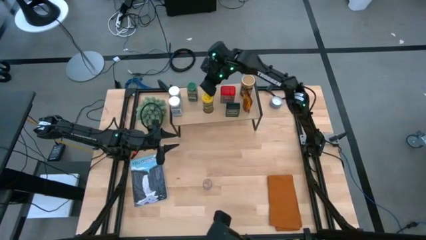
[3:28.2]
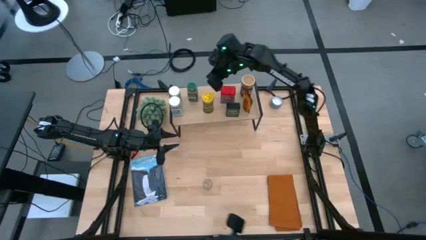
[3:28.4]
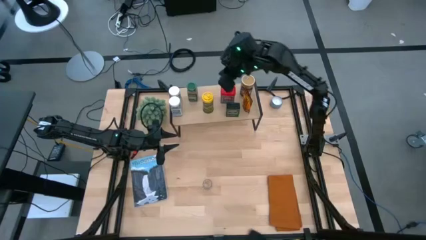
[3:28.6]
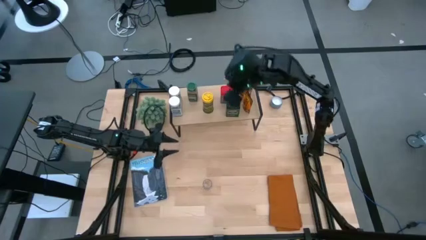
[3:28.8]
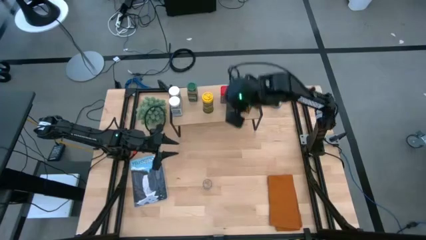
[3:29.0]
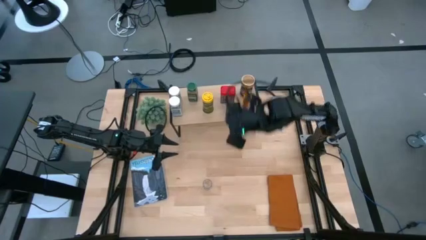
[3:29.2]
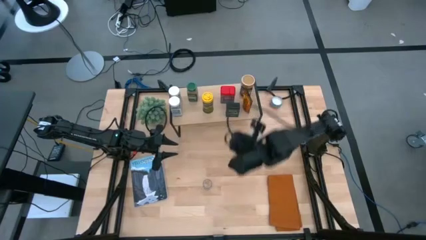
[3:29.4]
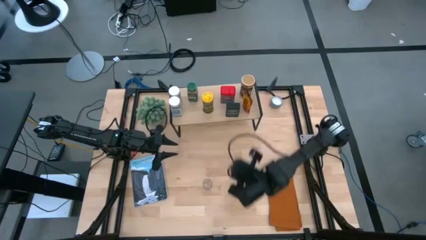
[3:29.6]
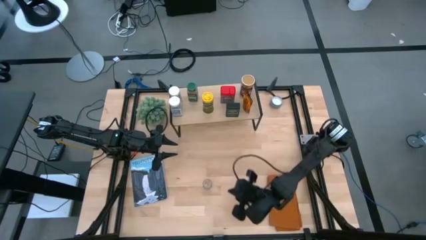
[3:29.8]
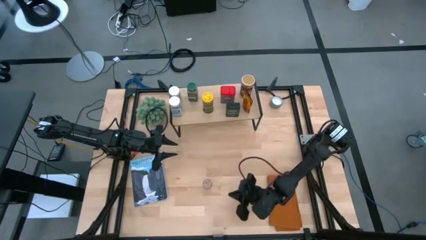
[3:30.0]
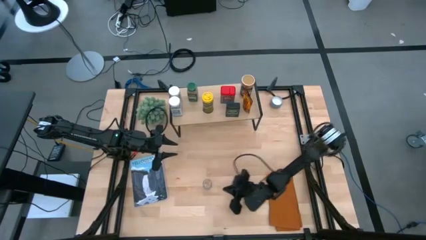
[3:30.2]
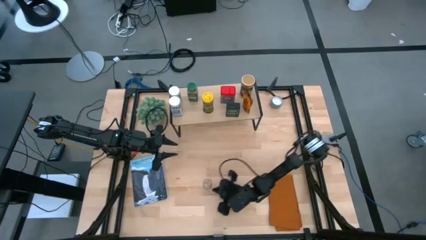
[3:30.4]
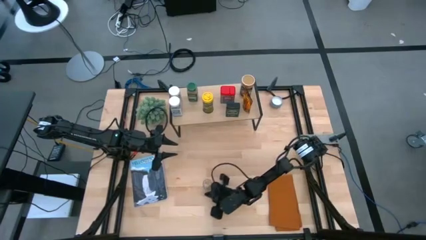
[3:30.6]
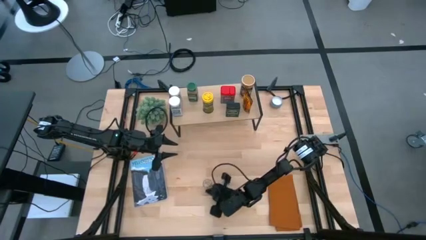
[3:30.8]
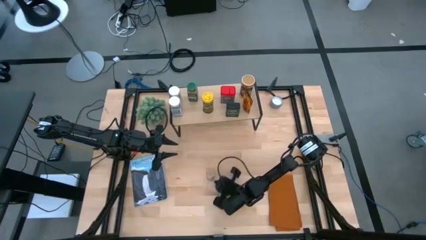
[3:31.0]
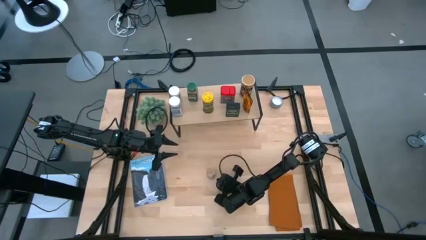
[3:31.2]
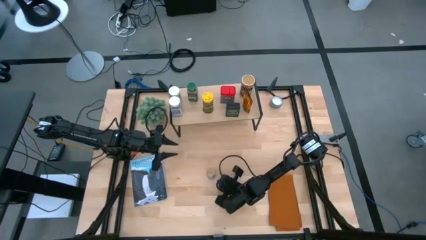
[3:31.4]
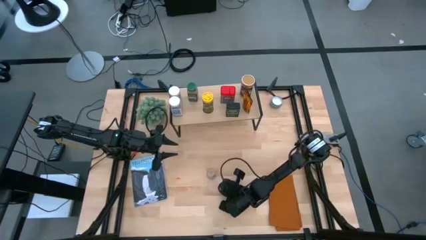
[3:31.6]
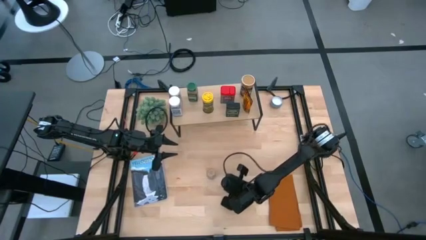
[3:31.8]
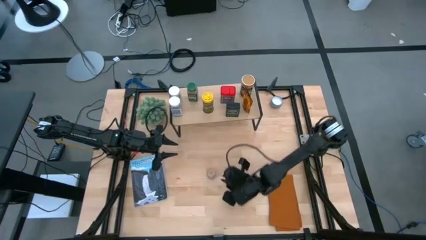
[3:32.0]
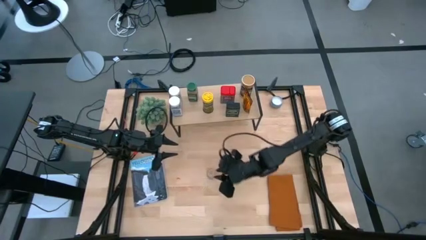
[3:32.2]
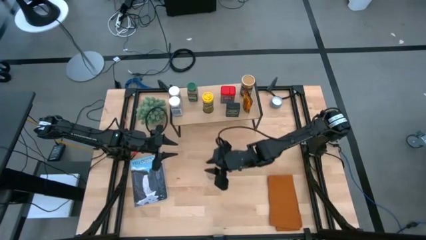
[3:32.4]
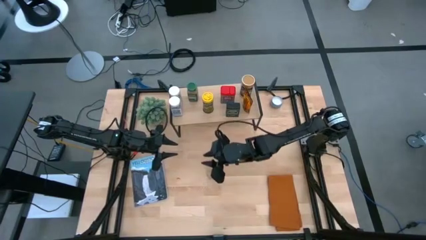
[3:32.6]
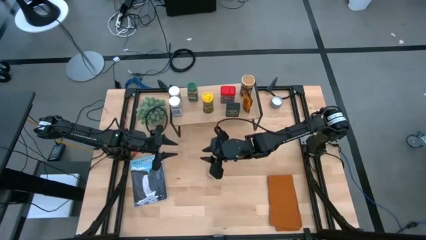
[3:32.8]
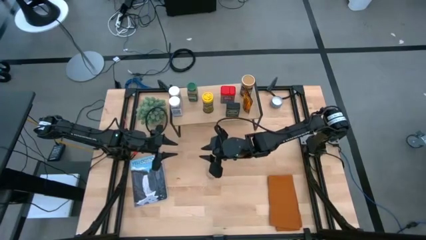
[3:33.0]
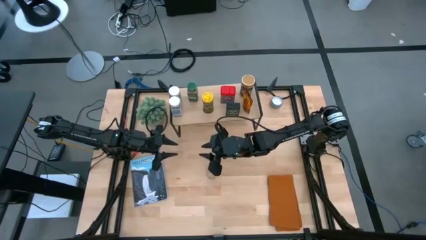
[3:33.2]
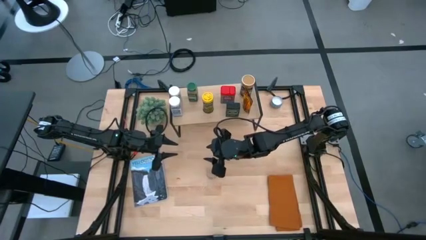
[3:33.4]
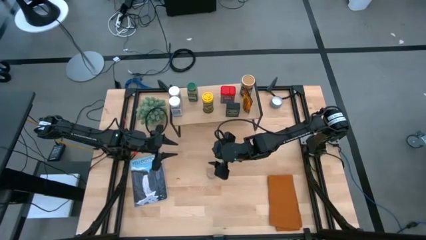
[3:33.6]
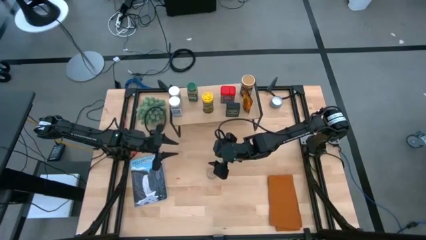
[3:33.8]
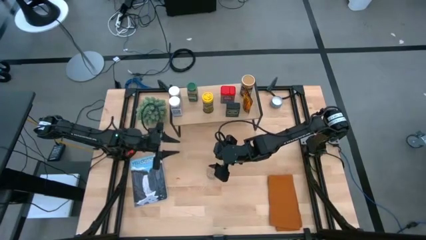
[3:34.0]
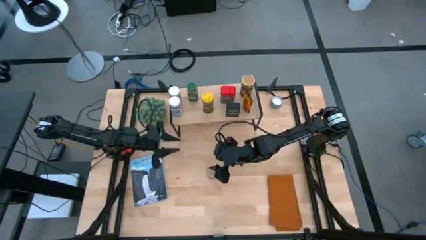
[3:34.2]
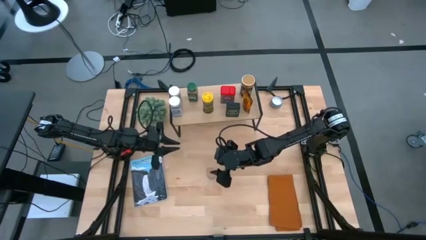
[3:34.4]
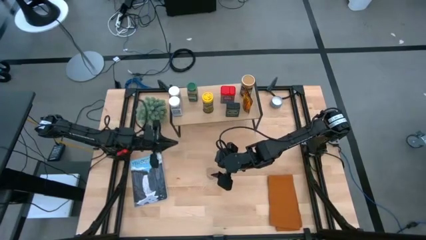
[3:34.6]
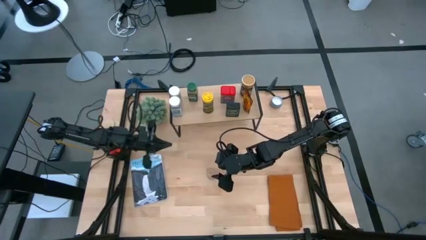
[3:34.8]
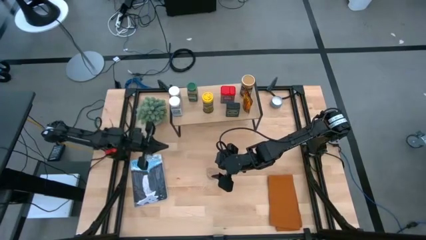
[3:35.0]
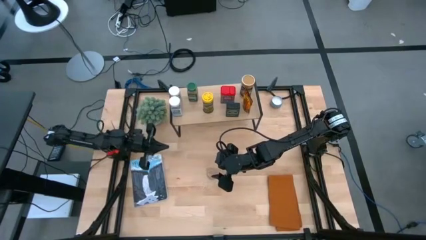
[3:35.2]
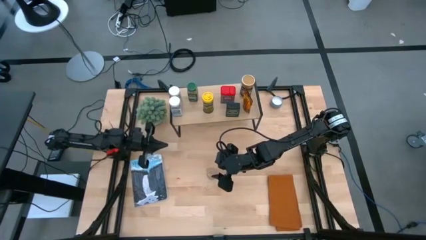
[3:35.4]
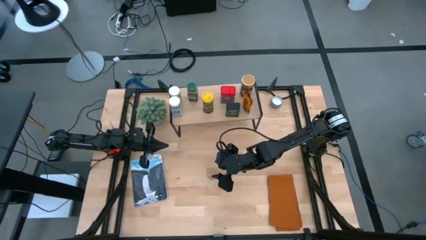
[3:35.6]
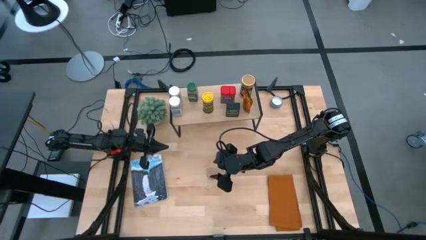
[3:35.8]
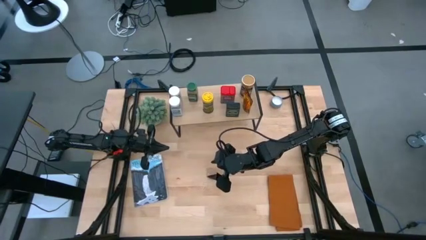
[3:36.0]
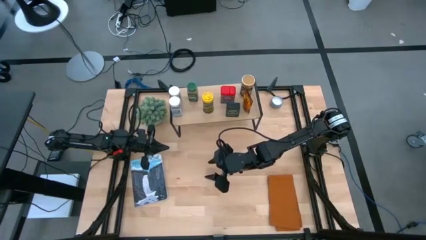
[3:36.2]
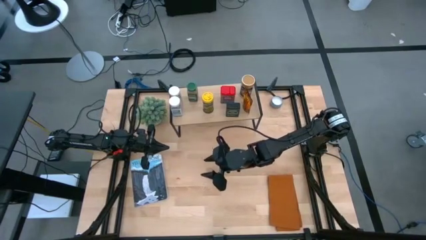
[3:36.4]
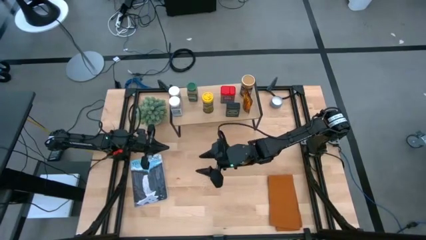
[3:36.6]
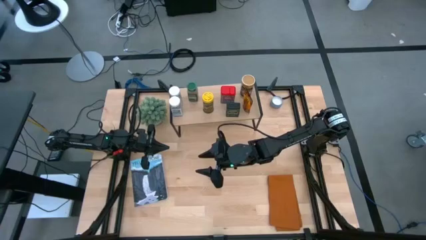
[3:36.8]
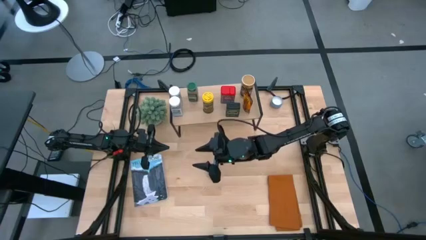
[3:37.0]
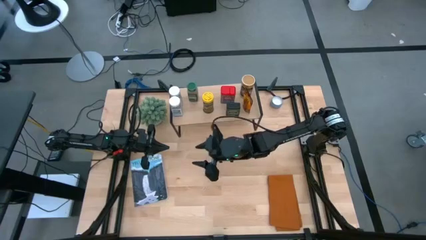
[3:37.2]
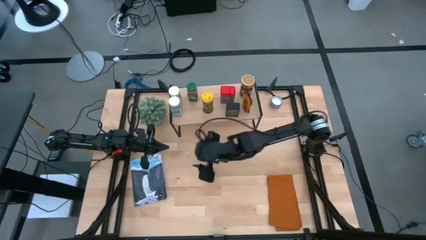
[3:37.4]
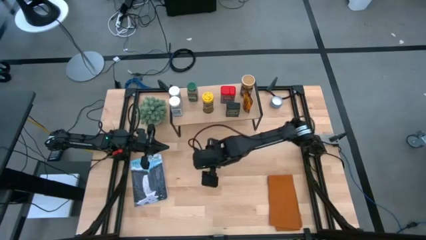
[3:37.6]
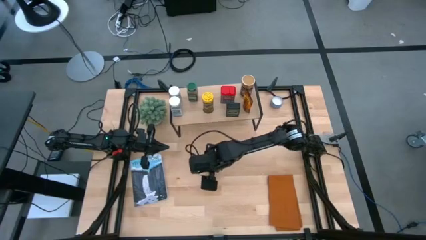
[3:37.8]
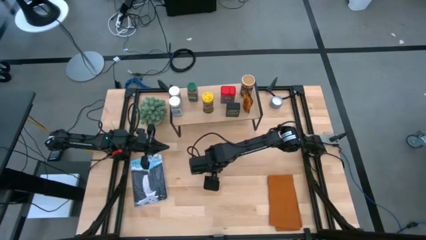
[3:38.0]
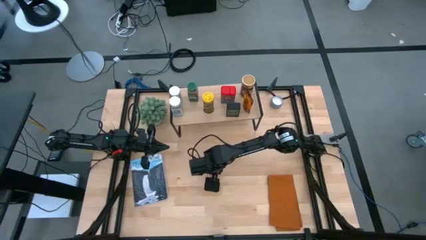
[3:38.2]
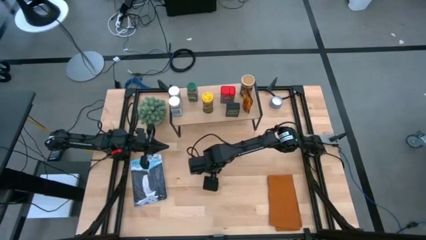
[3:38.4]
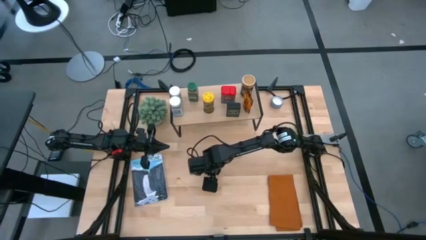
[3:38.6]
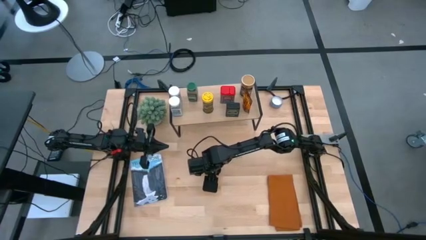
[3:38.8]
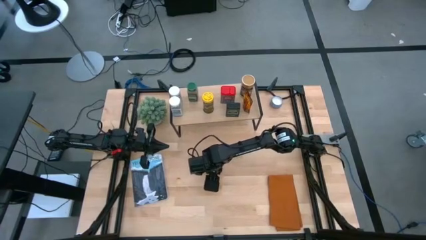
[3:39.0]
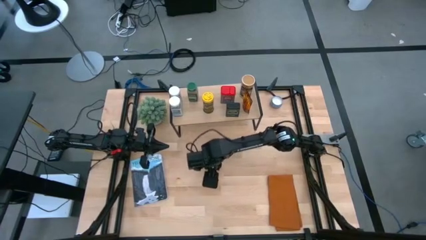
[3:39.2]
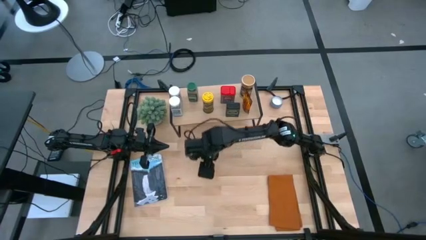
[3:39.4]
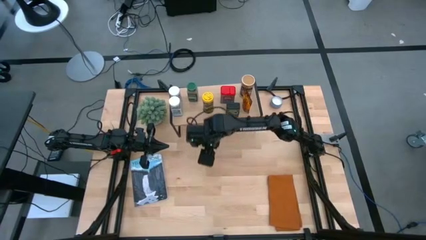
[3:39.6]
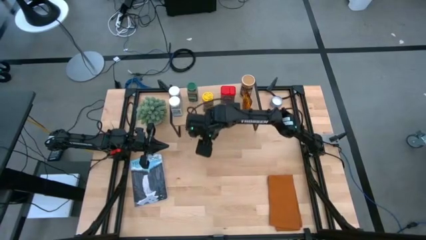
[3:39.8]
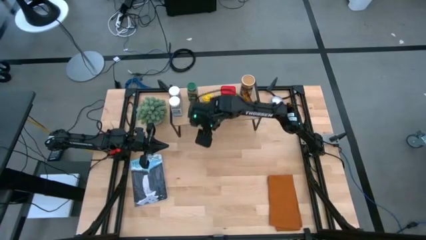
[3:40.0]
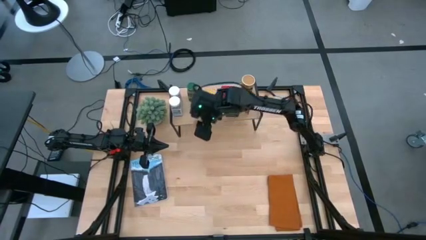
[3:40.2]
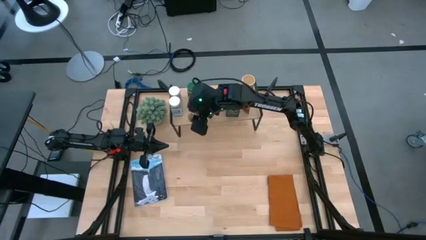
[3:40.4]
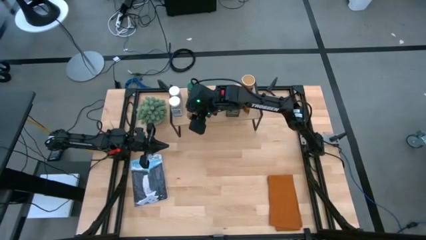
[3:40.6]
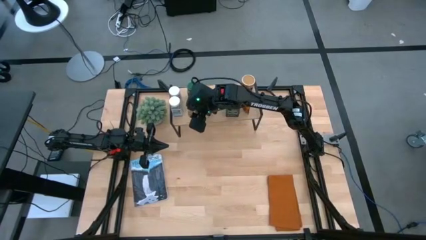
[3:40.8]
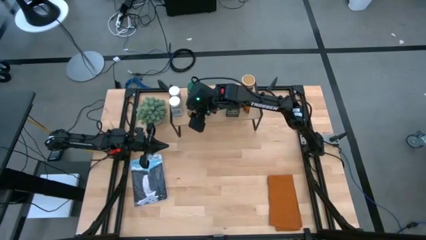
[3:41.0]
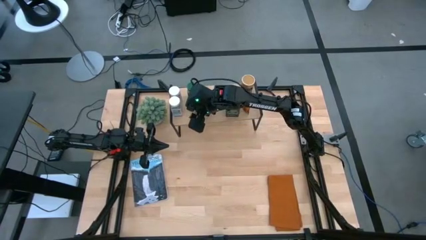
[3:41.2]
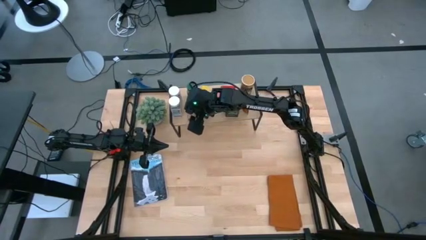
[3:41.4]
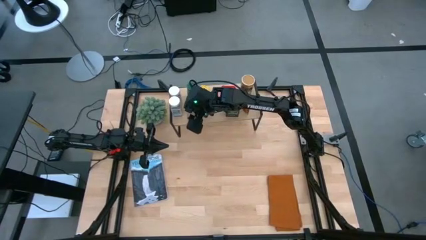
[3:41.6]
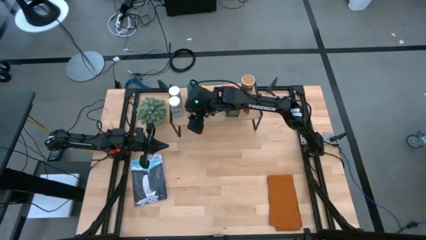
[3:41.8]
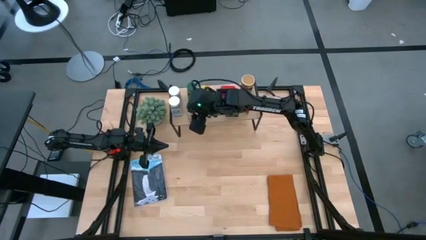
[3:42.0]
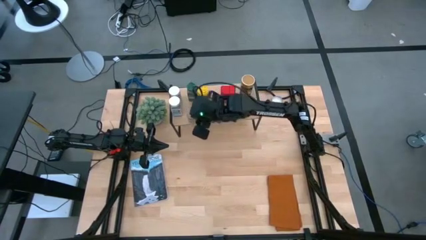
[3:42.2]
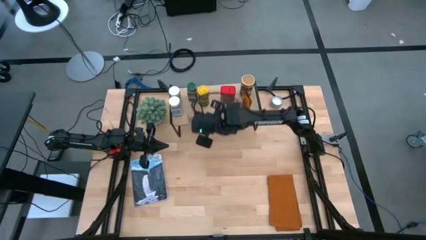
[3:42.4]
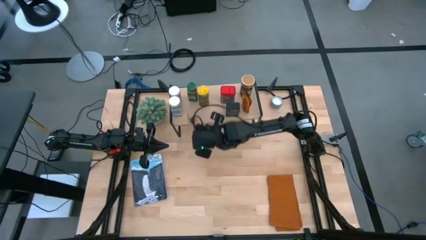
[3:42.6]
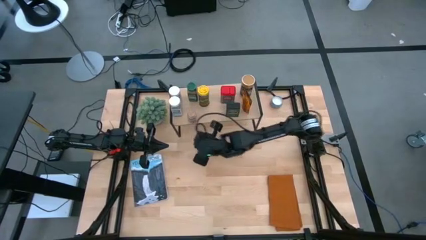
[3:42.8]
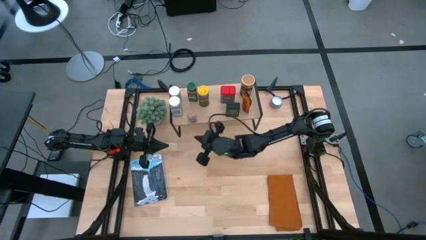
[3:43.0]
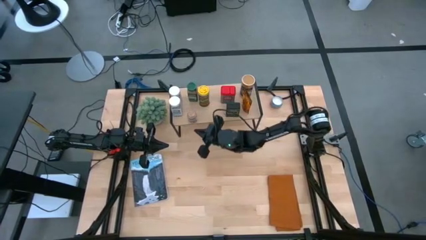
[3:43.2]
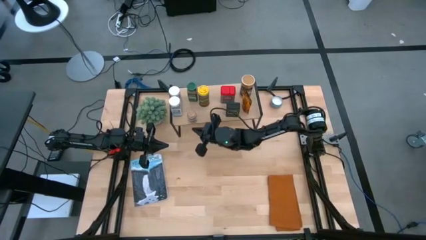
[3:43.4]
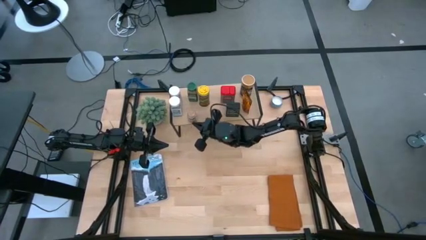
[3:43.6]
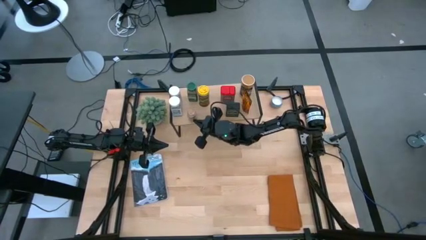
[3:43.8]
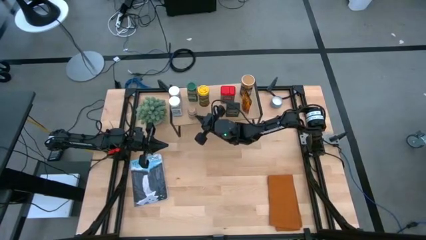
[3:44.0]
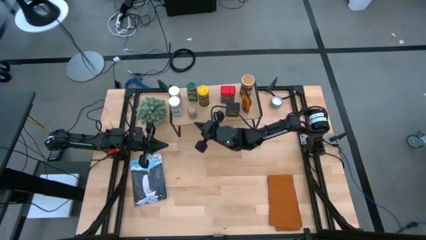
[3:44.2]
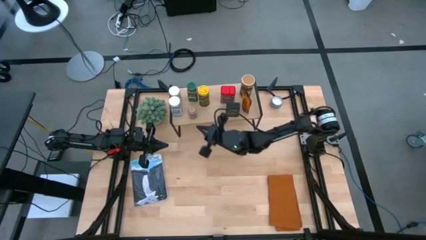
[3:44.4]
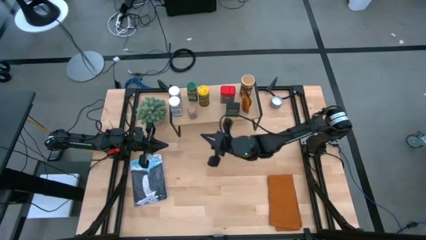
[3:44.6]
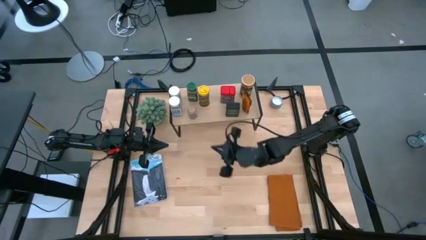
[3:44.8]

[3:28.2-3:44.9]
Task: Shelf spices
Put the transparent seasoning bottle on the shelf
